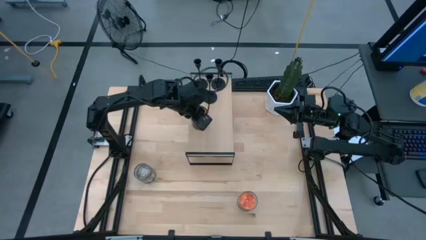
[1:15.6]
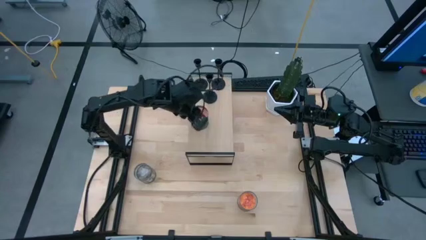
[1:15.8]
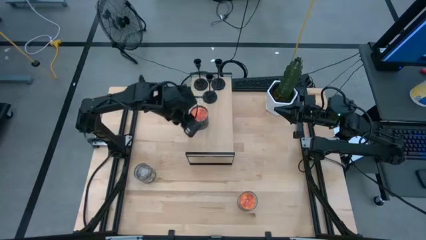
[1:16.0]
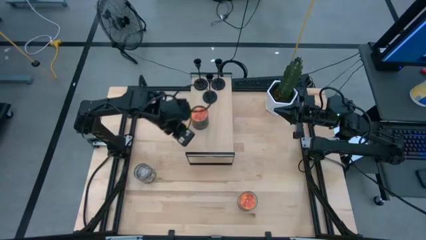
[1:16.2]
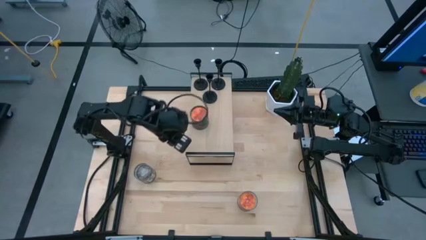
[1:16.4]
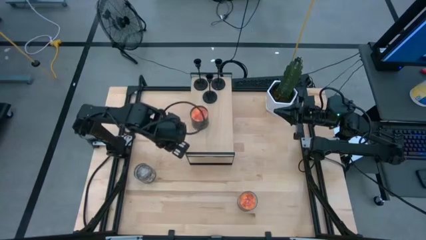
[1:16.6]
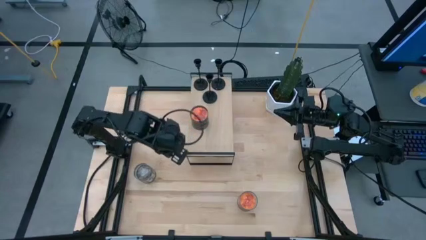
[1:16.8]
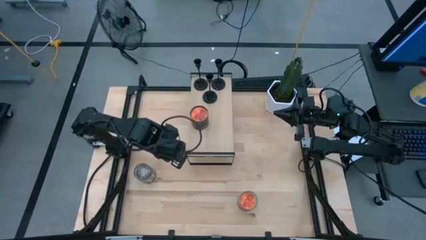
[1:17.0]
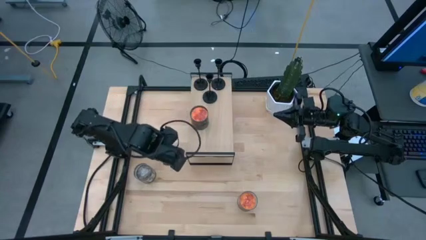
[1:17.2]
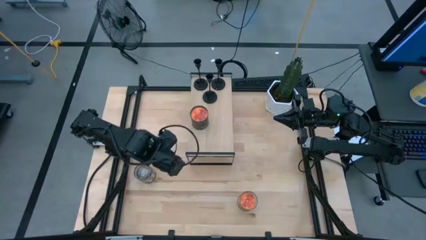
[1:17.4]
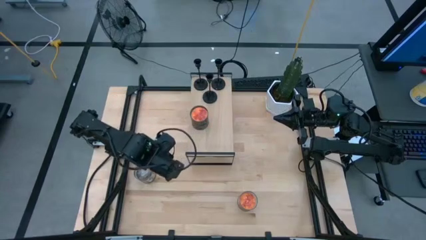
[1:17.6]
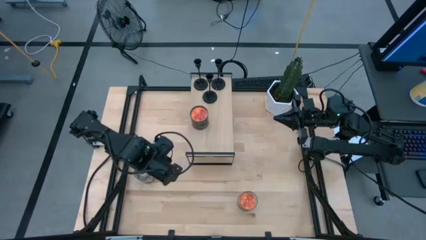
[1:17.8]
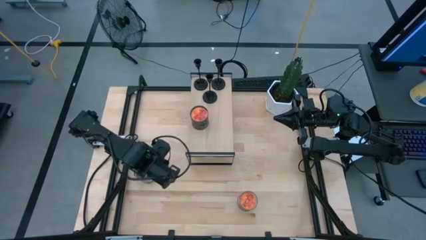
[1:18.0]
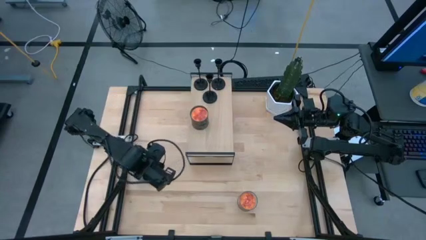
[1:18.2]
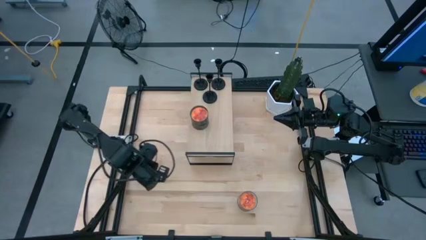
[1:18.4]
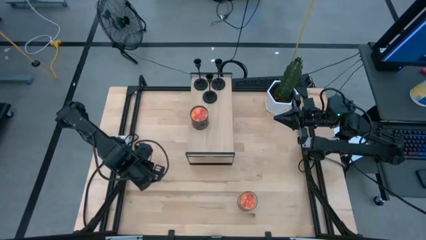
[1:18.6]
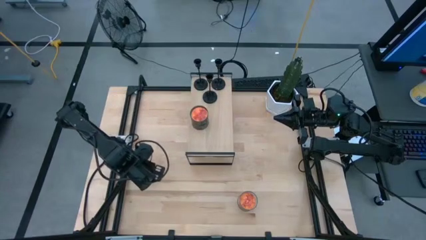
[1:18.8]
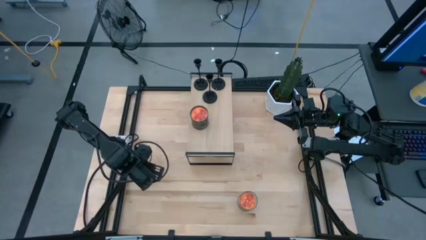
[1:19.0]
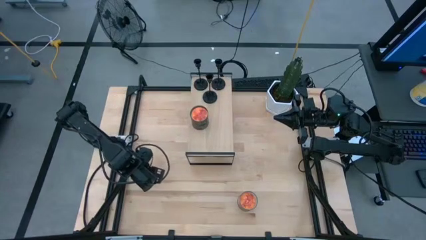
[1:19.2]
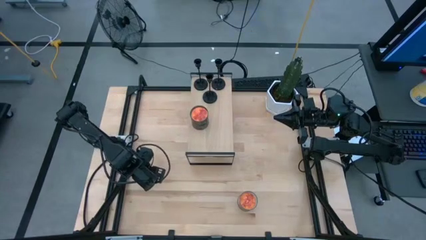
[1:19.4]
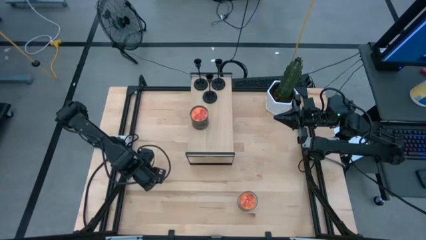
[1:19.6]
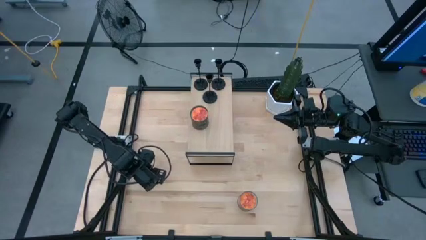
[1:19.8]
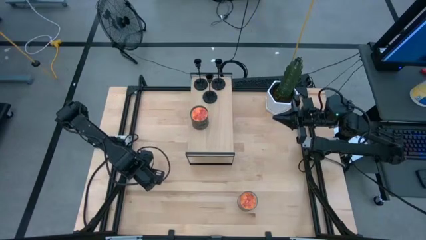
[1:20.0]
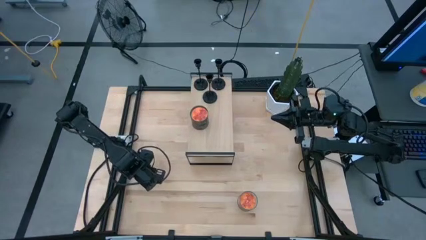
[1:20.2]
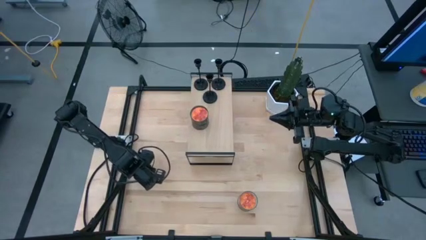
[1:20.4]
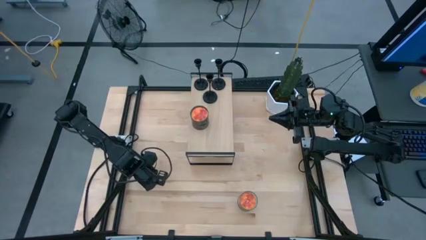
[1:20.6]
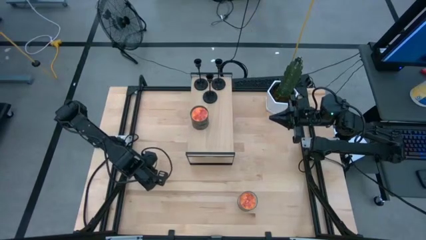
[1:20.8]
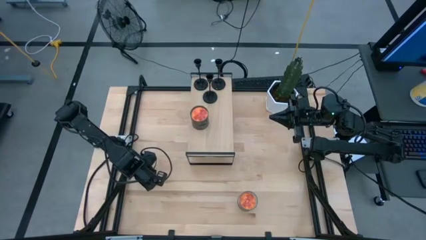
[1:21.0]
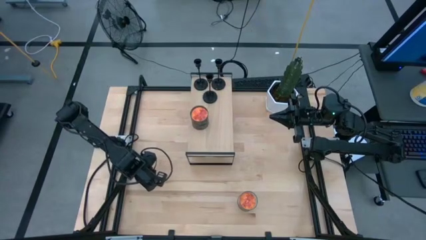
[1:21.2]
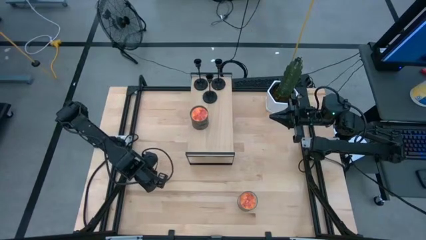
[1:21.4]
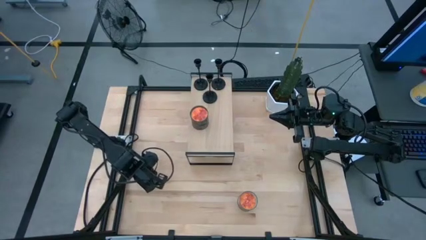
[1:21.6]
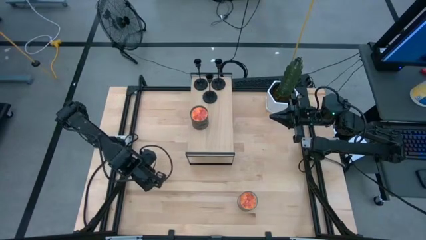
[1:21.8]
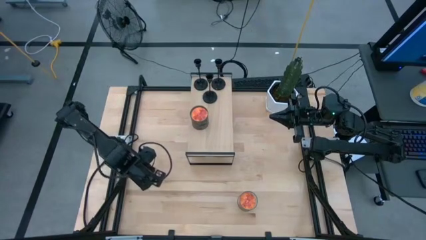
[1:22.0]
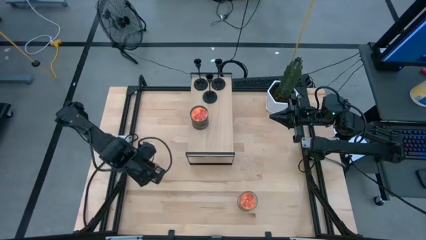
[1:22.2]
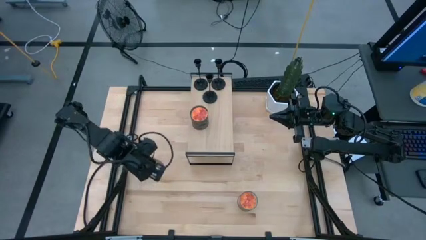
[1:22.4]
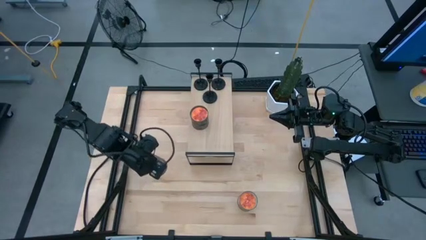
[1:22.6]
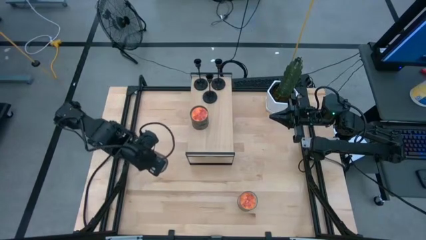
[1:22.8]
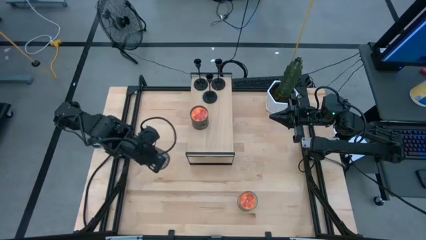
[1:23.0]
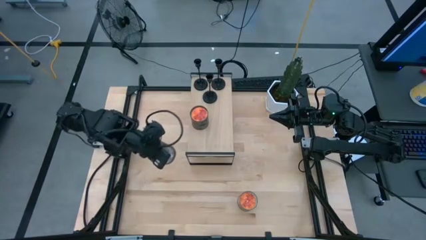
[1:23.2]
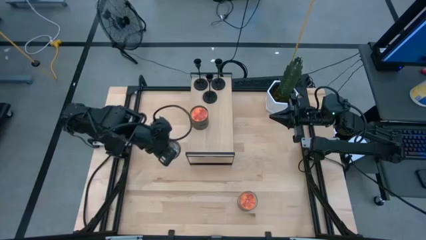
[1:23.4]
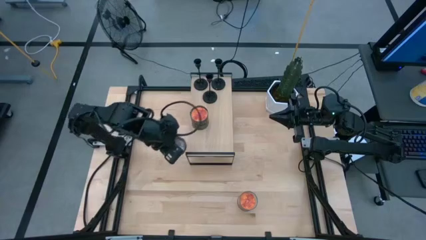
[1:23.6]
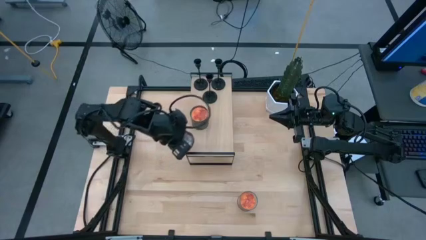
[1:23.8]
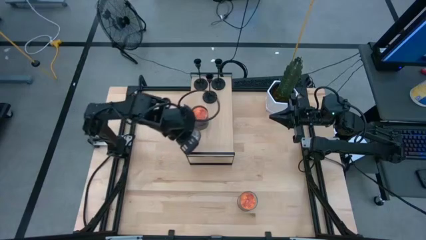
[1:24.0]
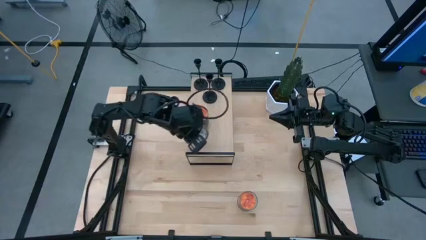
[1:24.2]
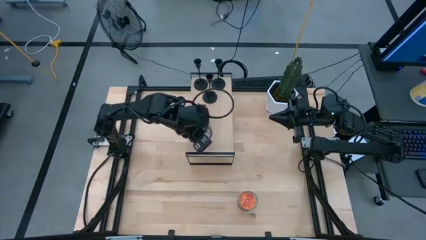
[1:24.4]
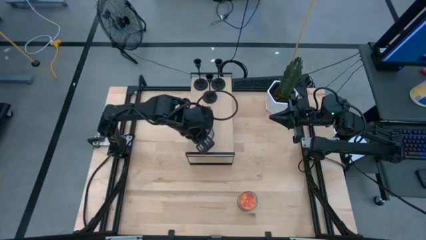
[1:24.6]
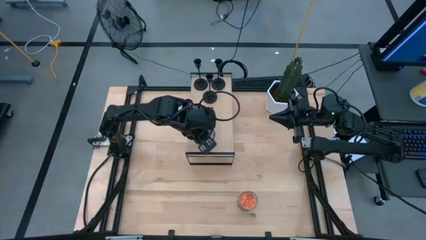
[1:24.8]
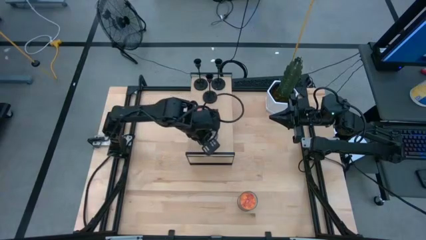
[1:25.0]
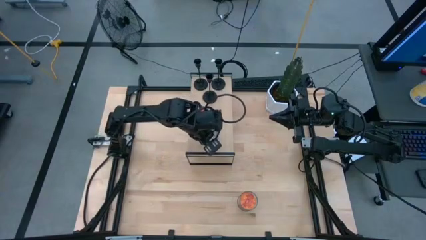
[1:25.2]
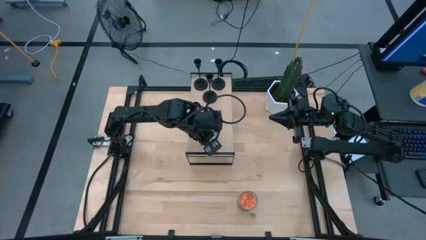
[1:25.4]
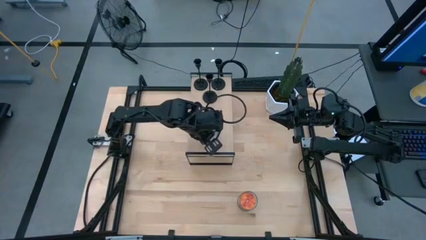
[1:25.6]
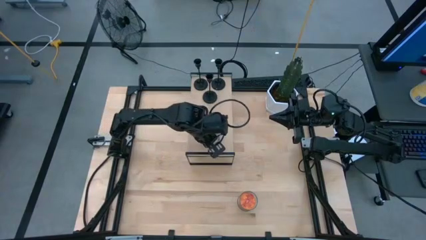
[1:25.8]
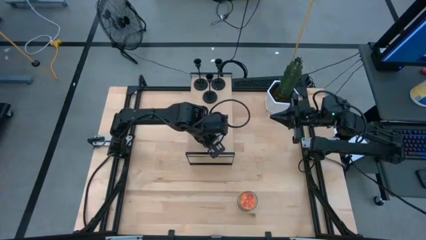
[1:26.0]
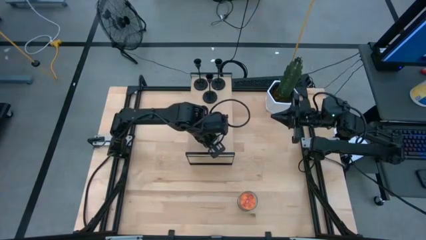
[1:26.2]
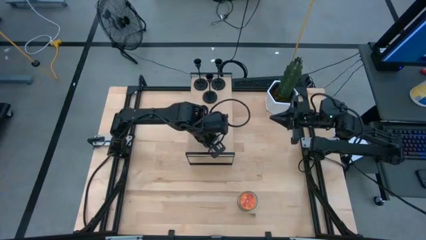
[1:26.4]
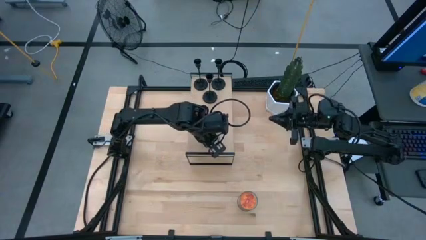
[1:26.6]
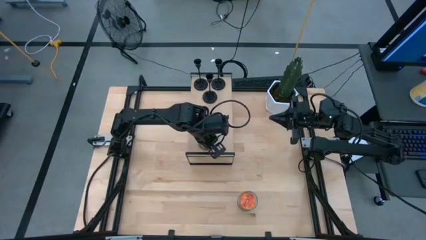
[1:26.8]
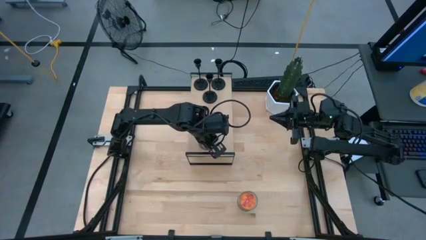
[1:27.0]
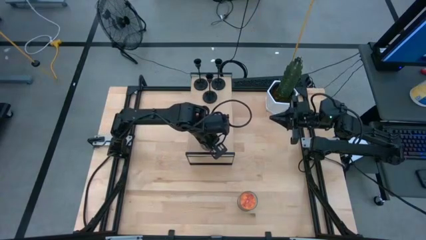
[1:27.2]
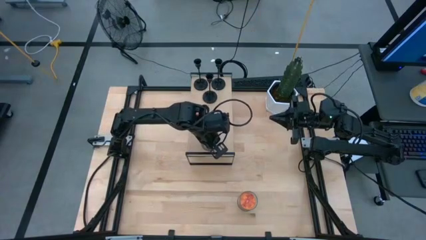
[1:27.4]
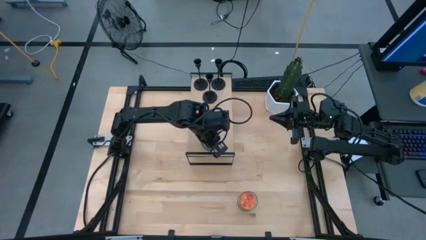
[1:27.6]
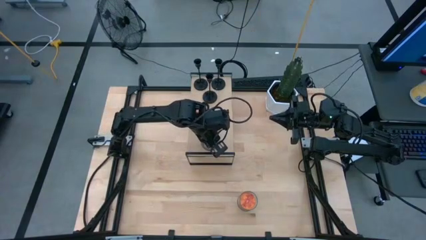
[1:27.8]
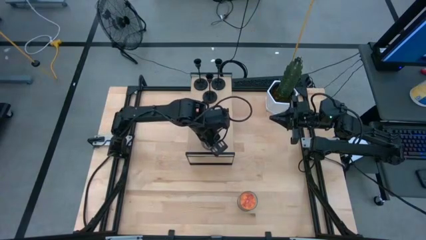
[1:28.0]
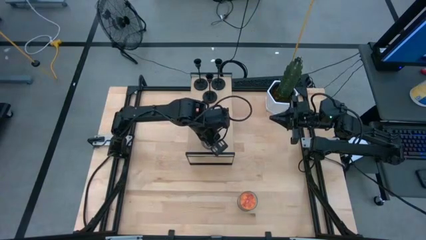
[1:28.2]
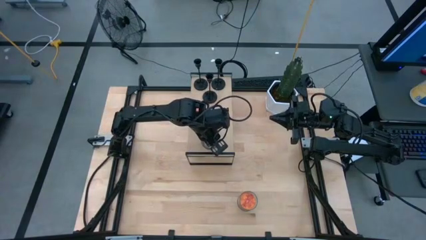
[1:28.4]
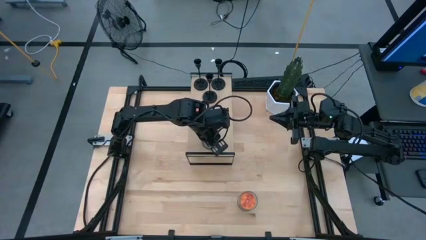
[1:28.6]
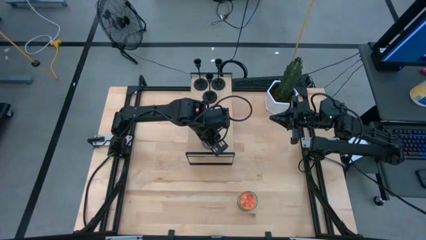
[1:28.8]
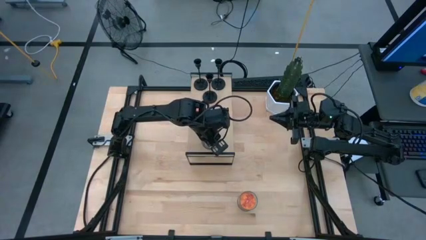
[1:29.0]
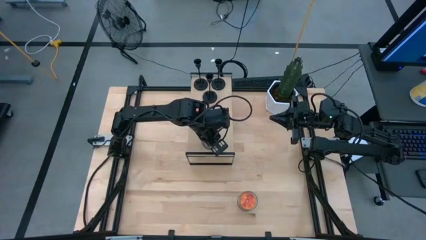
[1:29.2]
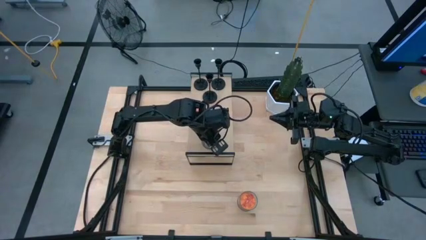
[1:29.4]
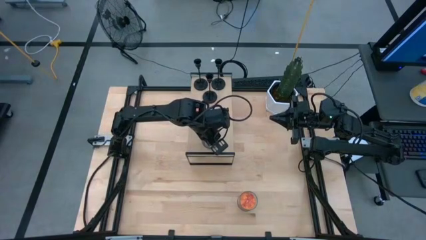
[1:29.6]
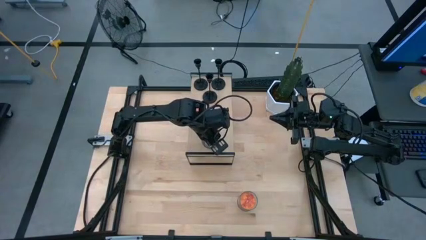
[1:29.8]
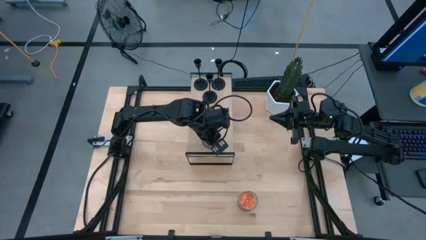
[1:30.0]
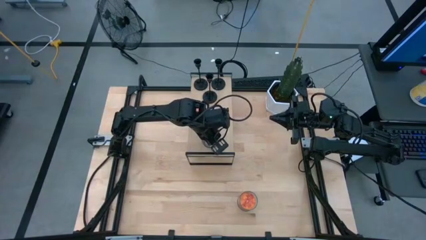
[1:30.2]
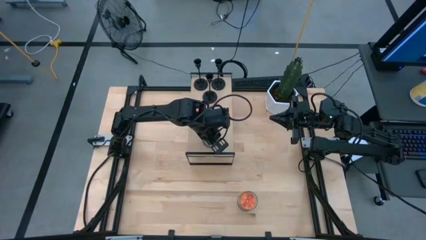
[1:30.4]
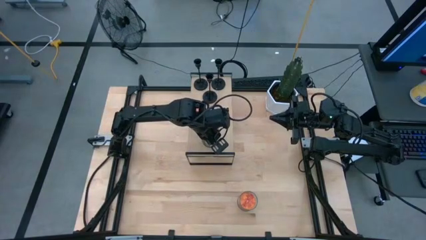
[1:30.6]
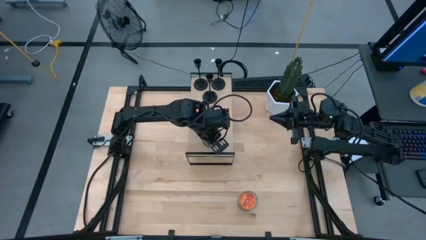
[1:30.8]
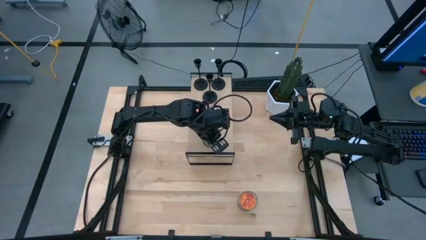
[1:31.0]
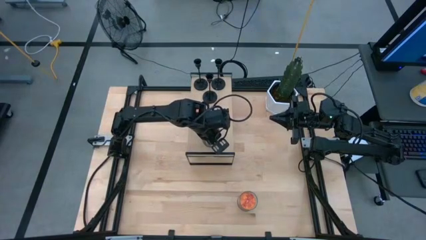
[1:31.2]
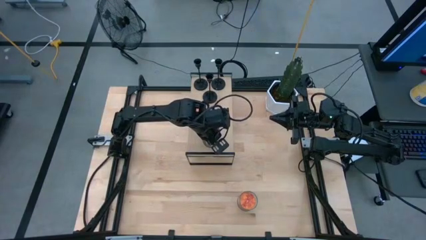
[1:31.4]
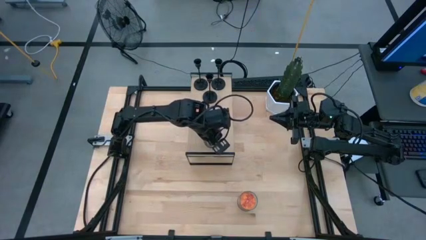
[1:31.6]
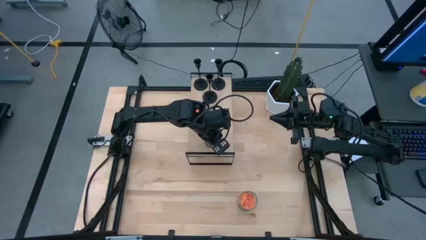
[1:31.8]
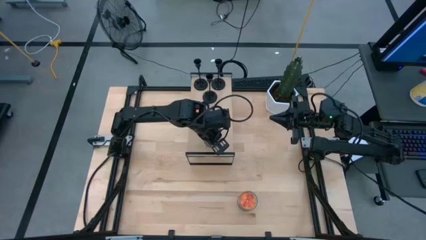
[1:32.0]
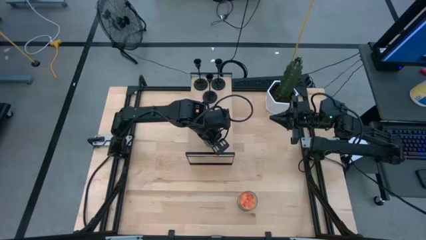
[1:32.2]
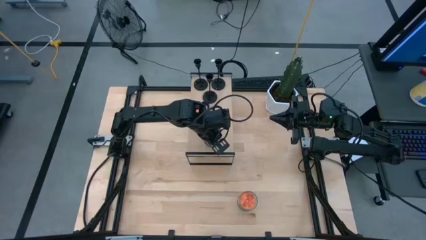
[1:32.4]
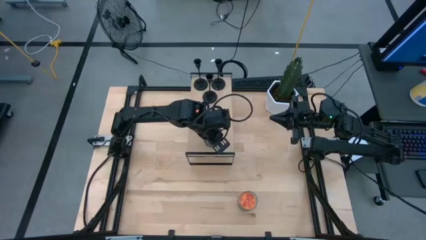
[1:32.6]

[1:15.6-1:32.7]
Task: Pick & Place candle stick holders
Put the brown scented candle on the shelf
